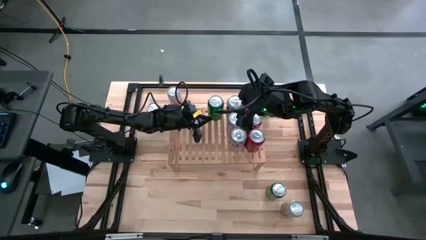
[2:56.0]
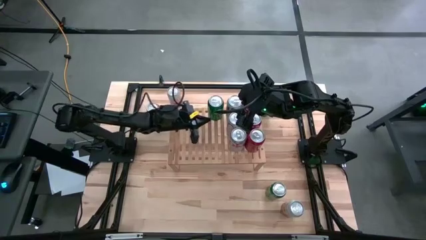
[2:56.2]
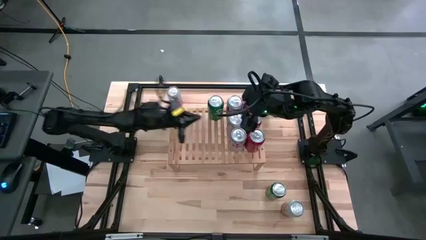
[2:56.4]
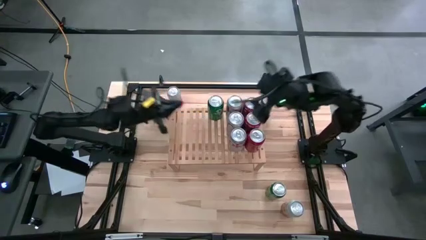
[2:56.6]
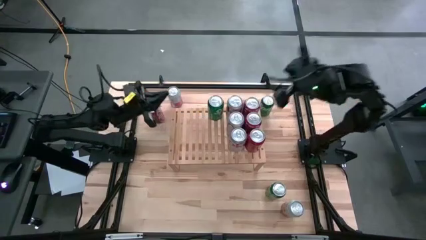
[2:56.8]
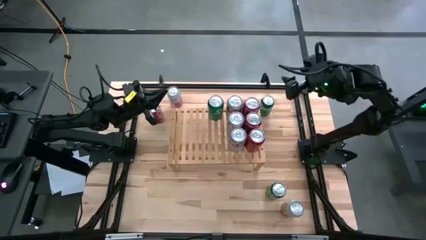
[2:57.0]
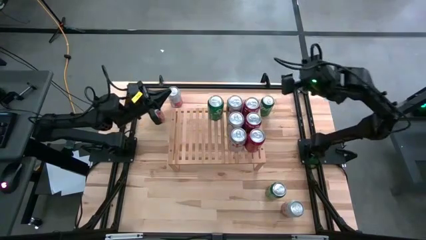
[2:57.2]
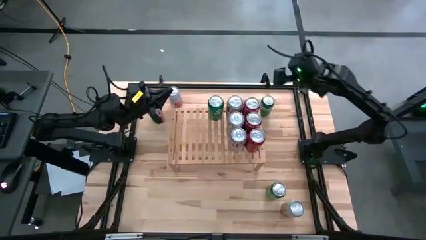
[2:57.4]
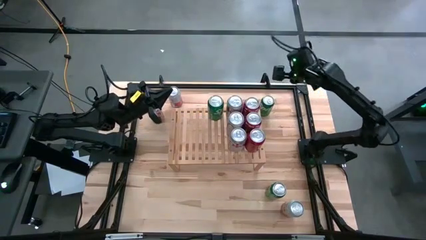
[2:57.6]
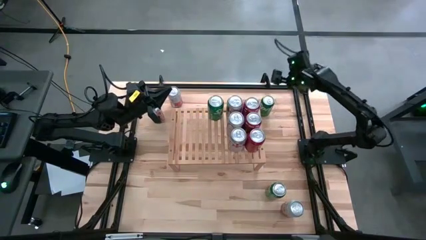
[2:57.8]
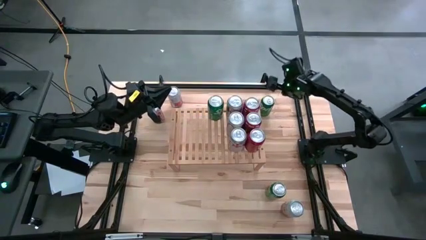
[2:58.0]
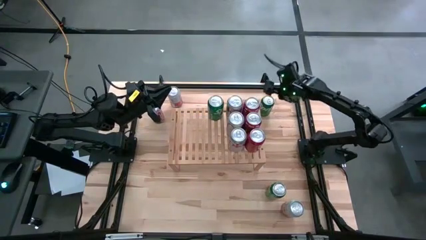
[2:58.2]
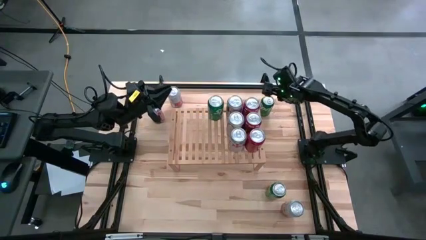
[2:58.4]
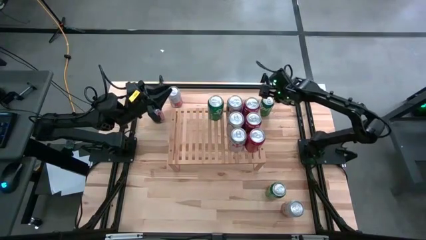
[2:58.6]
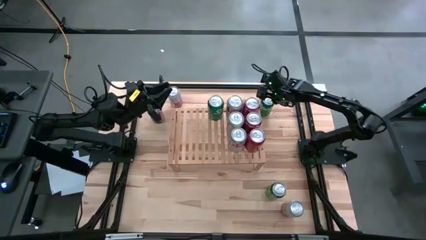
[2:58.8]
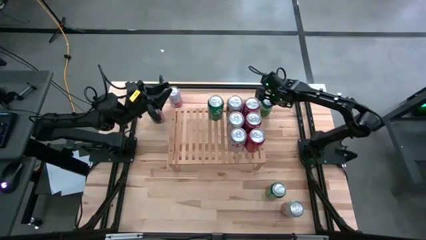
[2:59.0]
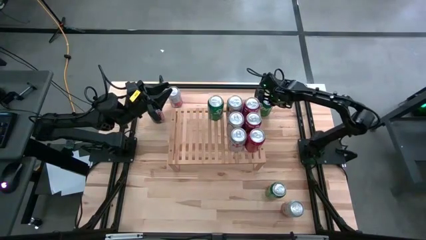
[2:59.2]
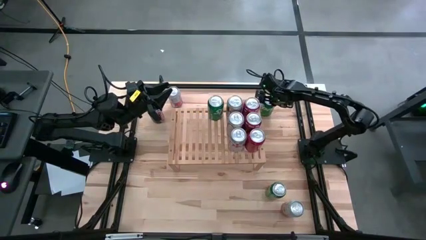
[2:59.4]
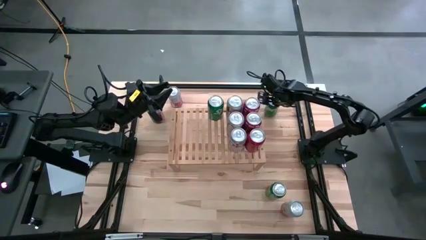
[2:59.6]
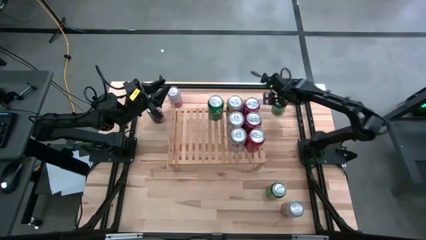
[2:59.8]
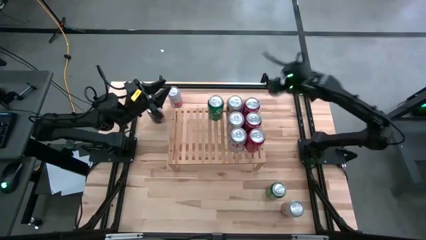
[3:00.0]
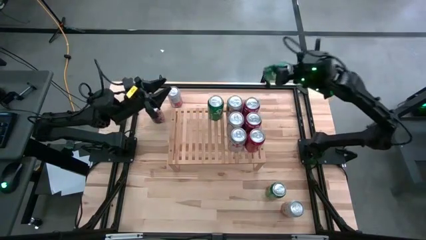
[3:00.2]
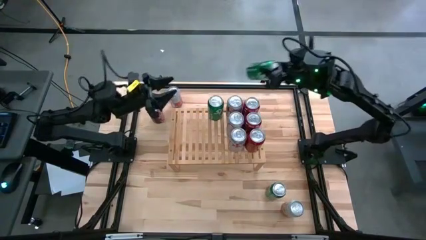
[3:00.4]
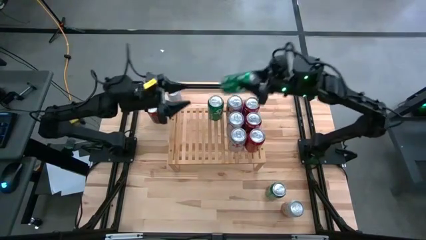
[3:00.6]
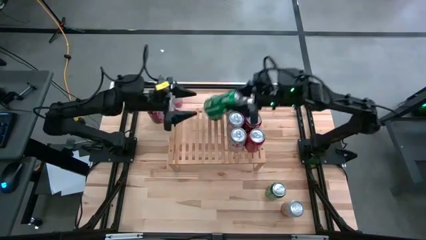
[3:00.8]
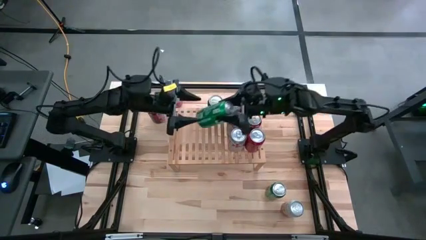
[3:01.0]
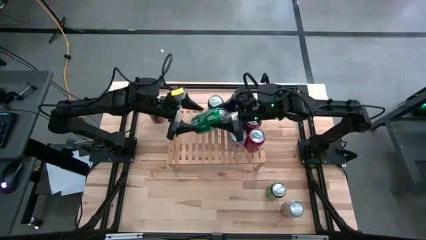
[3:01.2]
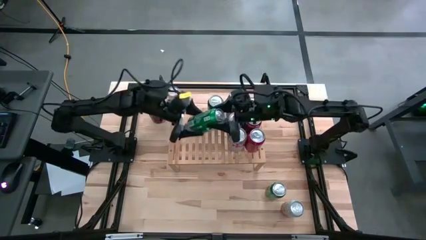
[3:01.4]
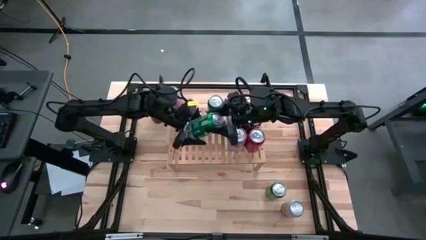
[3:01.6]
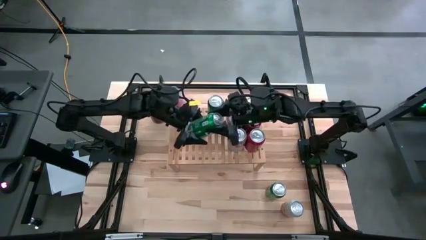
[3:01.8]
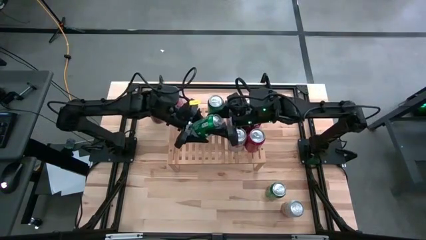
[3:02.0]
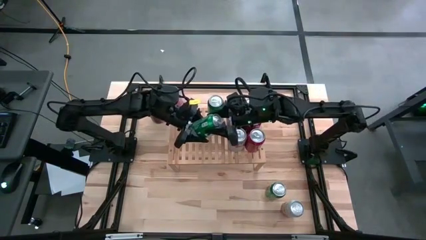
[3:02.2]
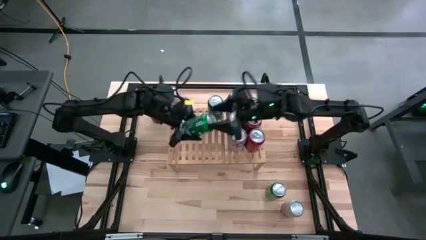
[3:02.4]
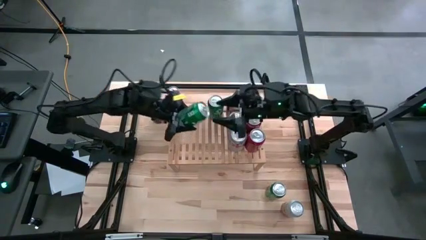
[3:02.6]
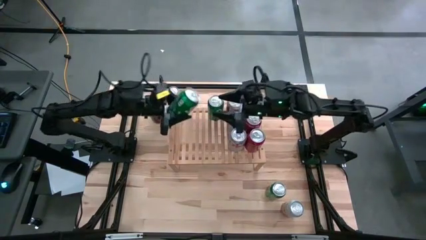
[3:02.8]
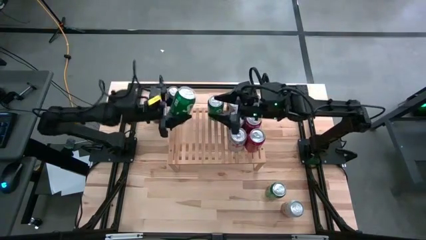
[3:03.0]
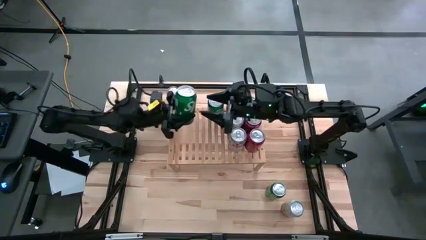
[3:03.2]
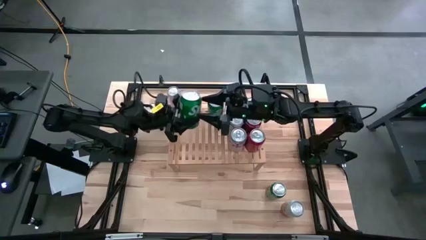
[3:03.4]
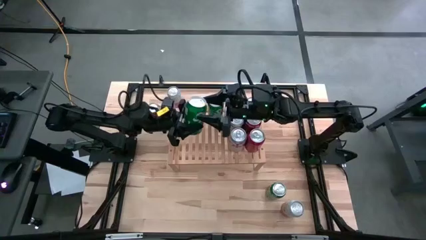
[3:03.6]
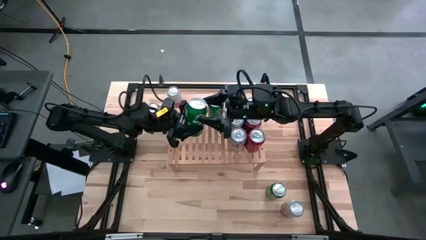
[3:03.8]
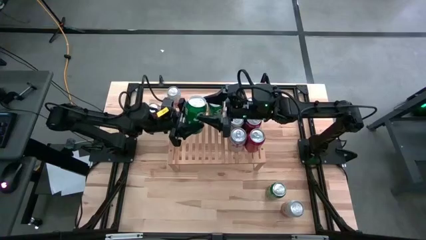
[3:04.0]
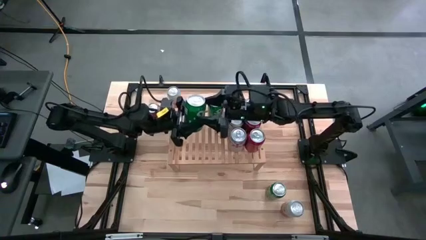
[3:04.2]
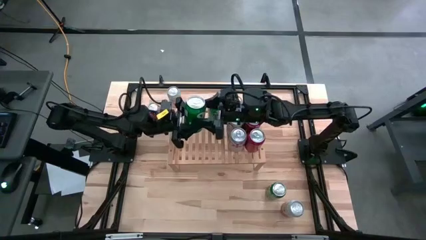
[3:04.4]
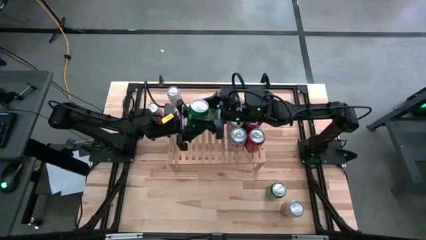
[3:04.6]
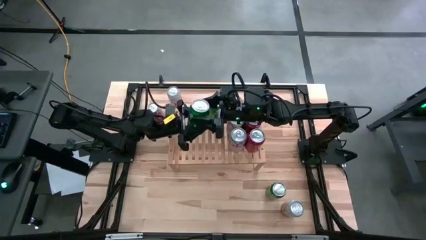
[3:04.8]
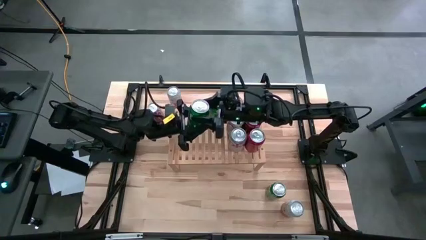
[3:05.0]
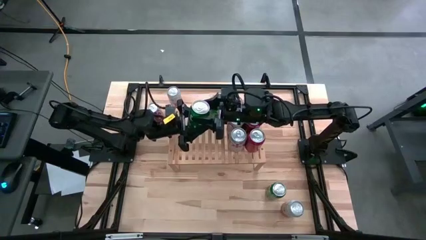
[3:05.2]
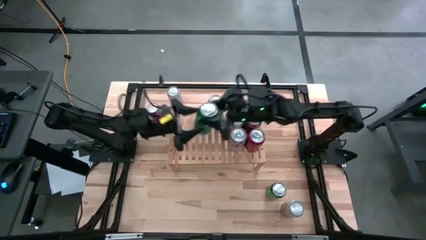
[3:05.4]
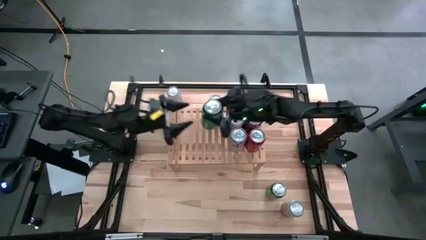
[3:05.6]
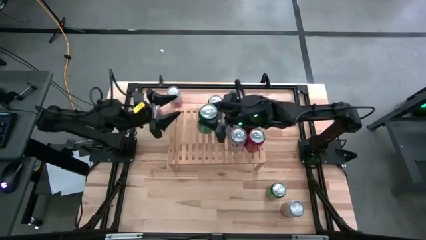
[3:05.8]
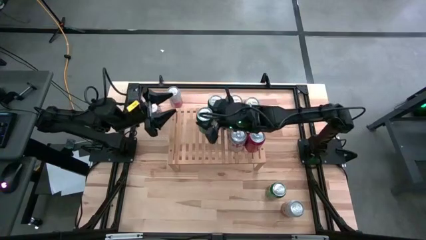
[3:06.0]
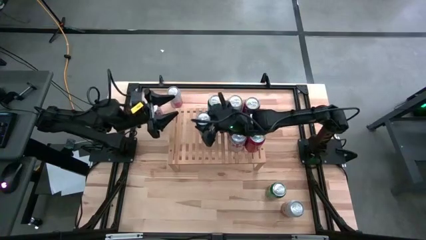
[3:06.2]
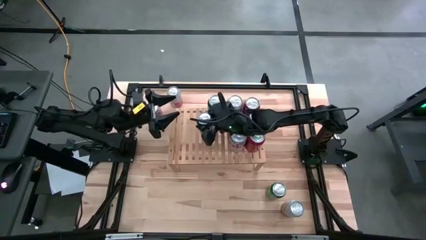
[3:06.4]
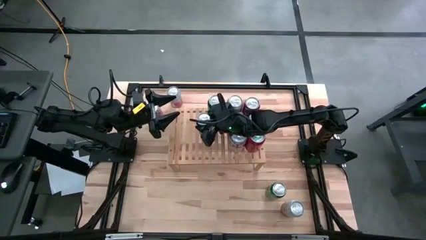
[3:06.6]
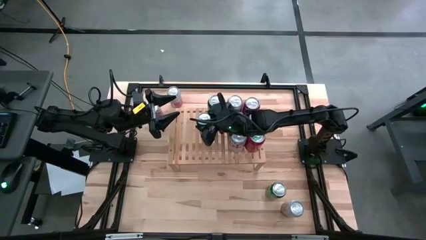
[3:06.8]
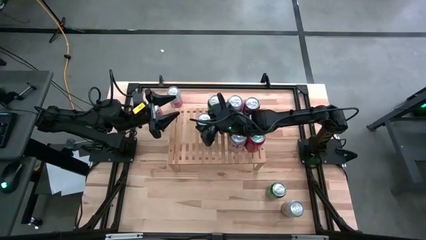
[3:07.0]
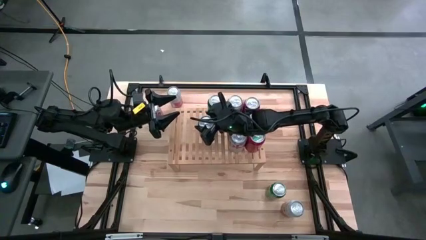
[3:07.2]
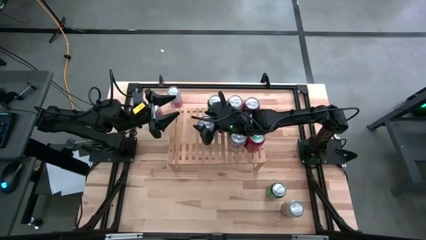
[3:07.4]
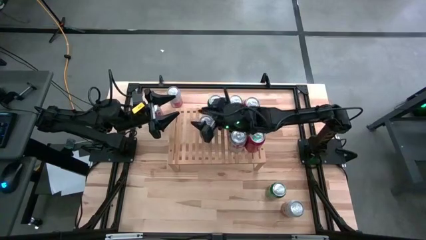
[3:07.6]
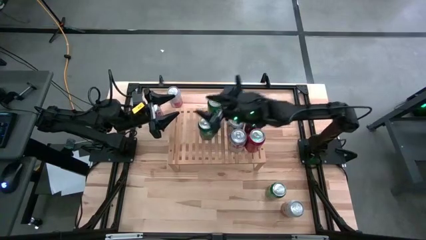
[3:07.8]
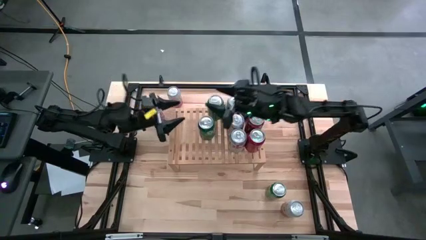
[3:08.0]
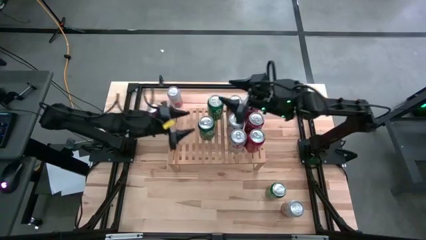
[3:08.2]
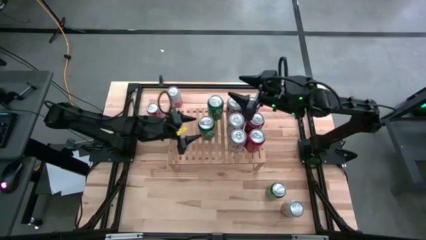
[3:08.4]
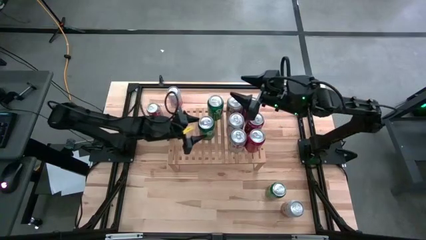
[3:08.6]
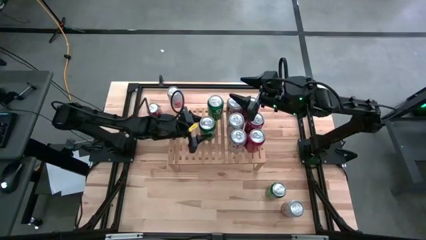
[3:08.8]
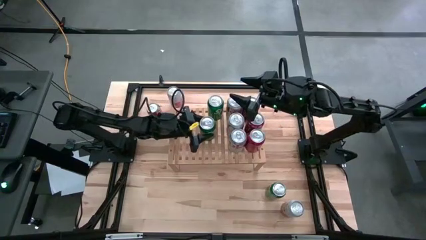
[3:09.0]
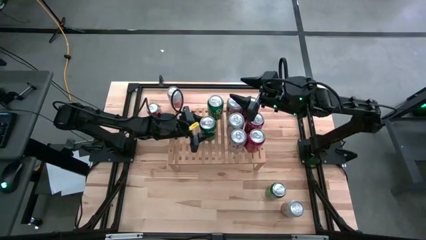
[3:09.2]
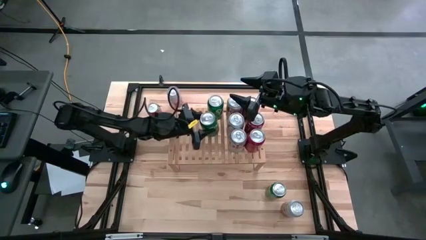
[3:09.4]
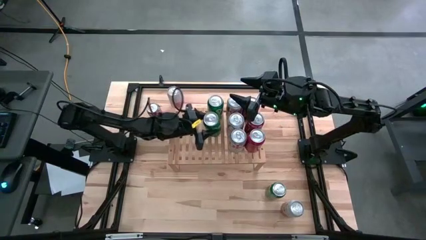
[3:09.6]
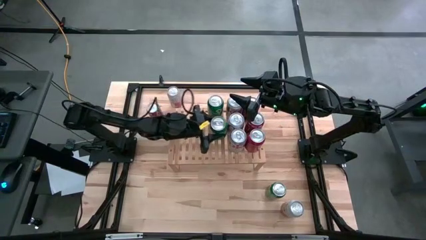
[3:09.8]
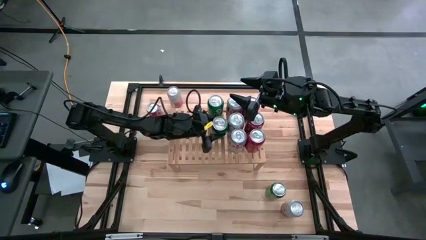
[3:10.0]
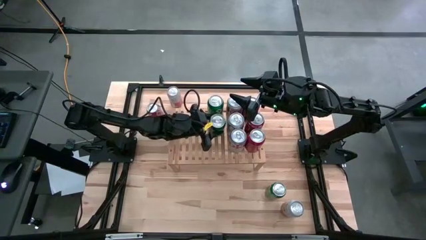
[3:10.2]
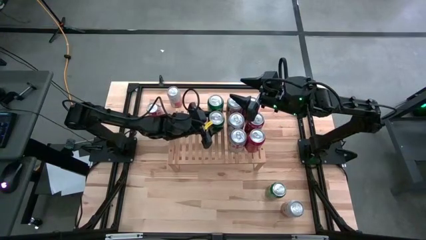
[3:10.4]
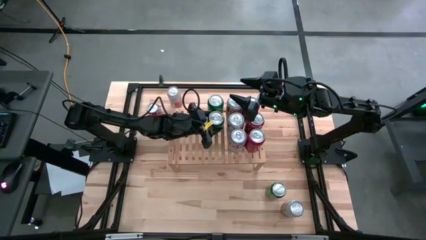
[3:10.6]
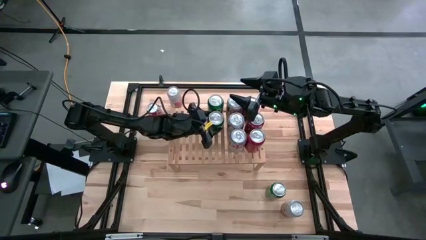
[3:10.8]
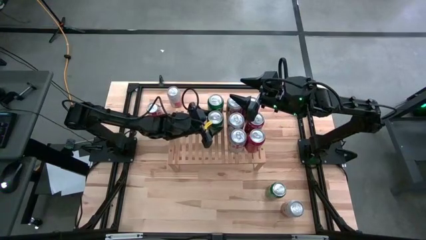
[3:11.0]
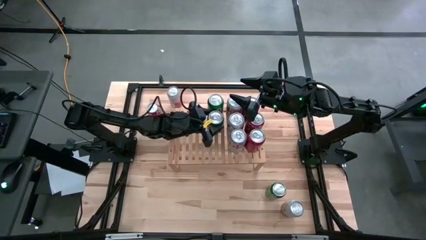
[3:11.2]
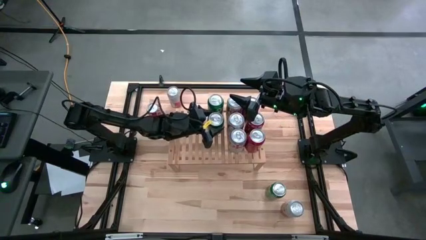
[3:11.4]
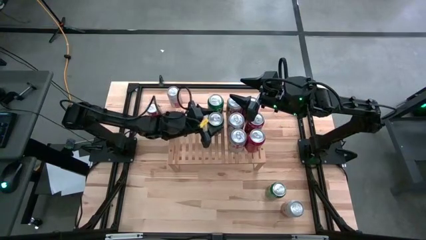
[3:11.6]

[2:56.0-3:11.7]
Task: Place canned beverage on shelf
Put the top green soda can on the shelf

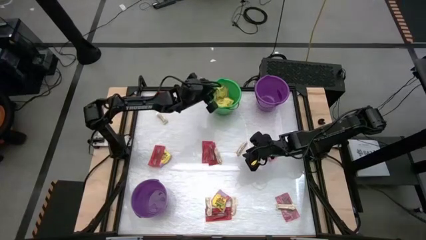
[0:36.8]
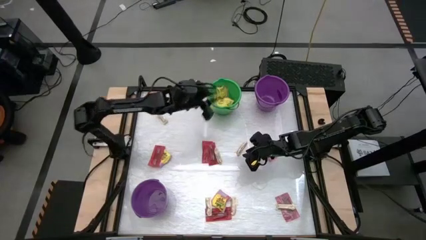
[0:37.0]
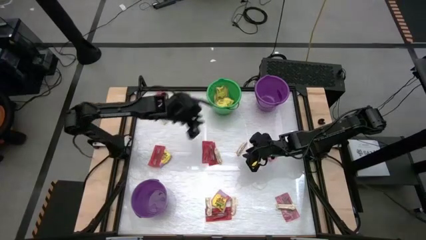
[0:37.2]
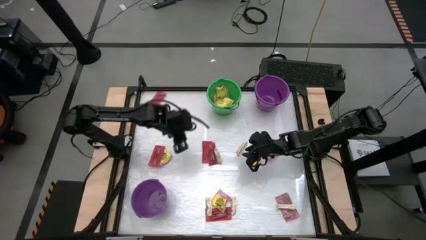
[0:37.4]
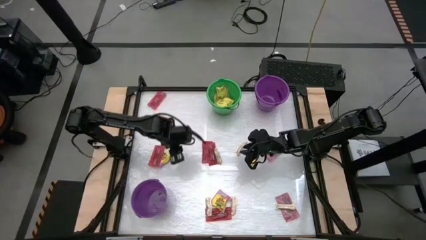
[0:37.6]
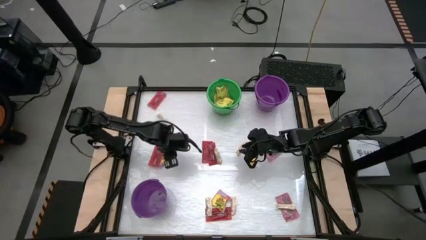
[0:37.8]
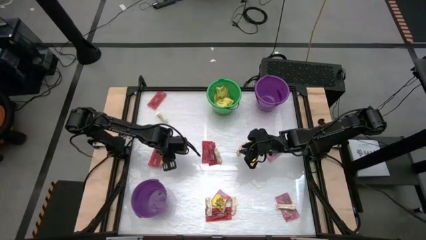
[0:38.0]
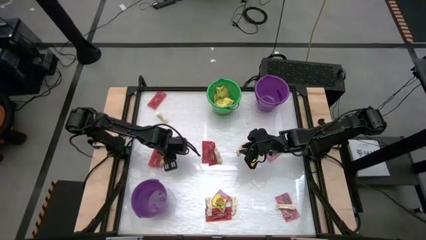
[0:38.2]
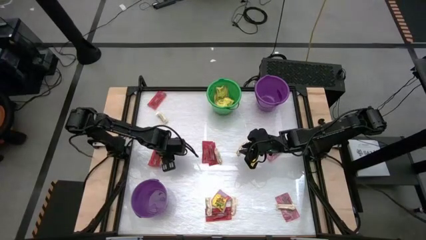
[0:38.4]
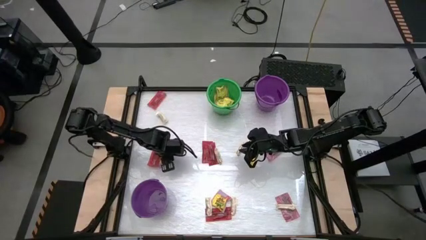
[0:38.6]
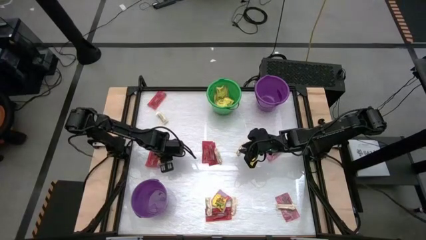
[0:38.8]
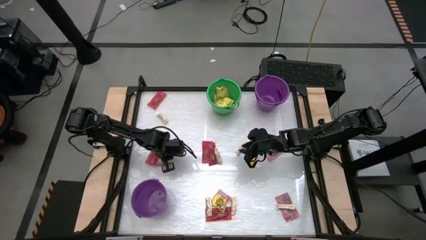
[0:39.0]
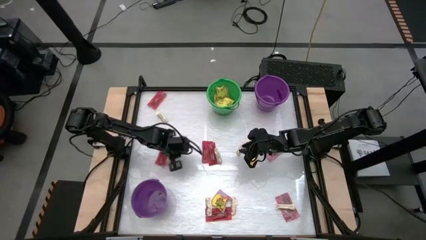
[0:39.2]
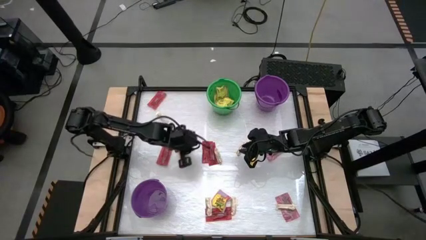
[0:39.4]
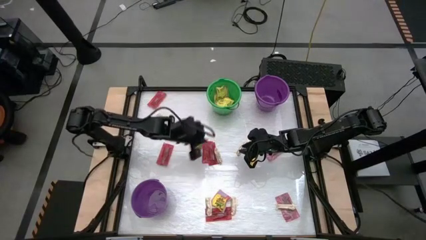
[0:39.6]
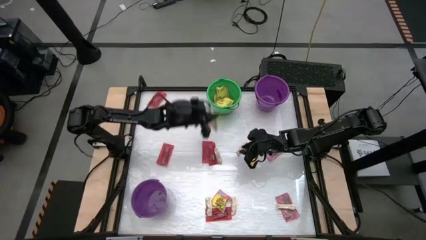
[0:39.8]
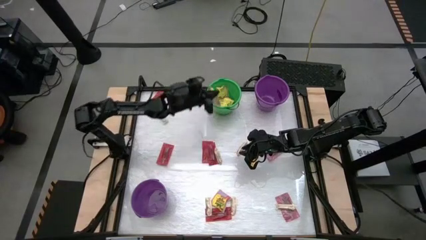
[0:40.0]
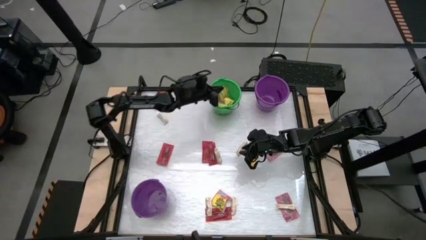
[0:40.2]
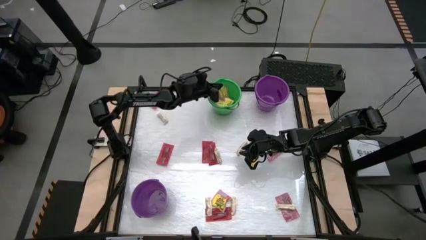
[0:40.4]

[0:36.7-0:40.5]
Task: Sort candy by brand, put in halloween buckets
Put the yellow candy into the green bucket
